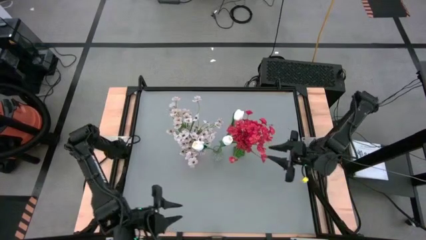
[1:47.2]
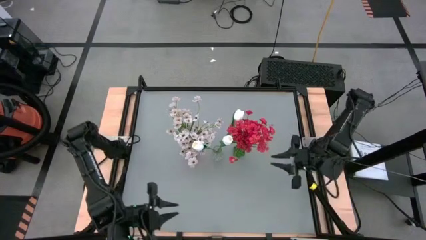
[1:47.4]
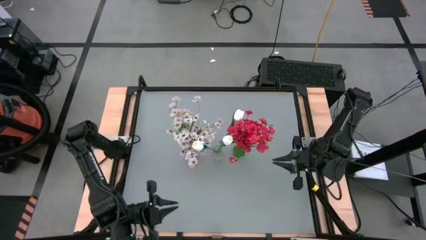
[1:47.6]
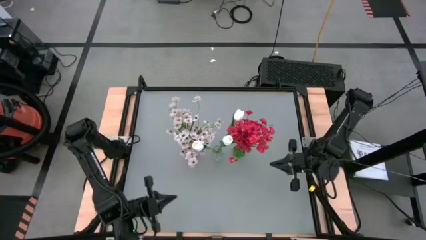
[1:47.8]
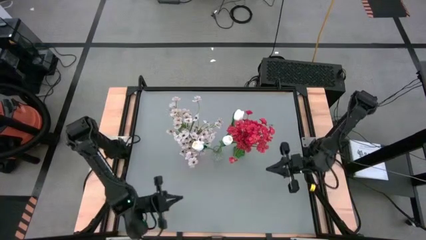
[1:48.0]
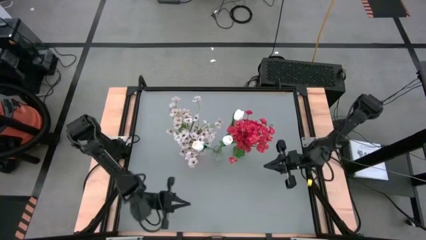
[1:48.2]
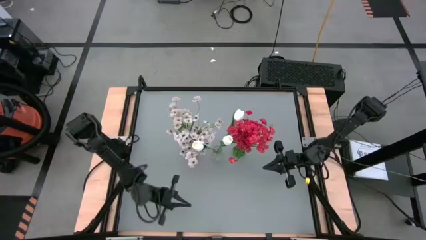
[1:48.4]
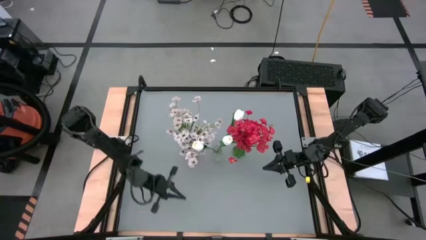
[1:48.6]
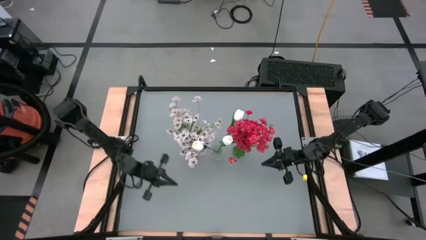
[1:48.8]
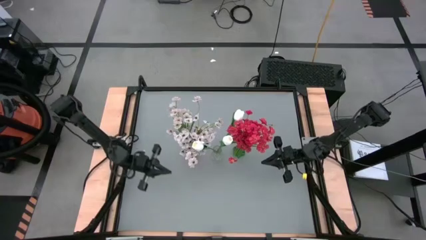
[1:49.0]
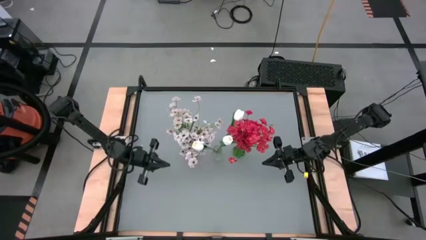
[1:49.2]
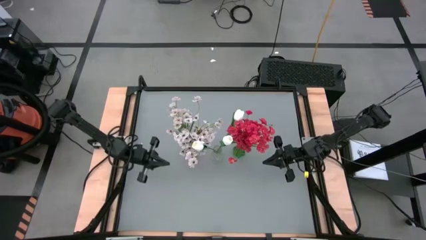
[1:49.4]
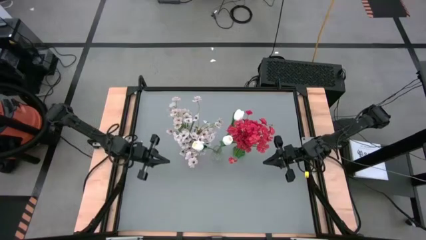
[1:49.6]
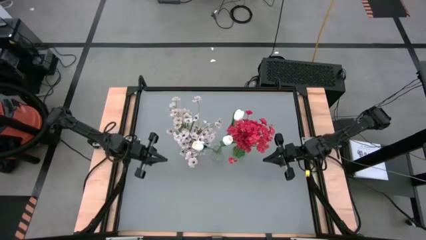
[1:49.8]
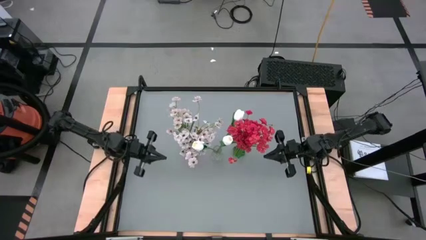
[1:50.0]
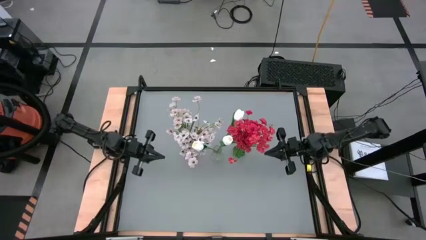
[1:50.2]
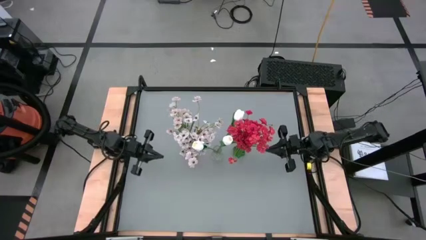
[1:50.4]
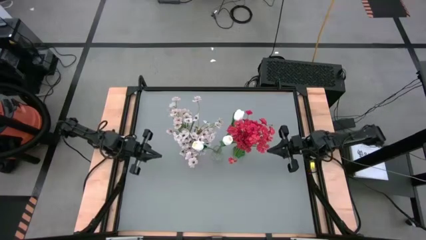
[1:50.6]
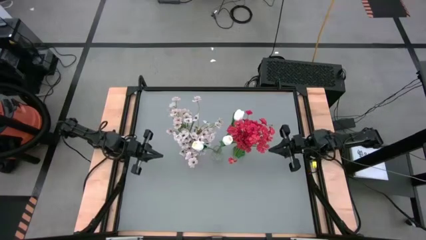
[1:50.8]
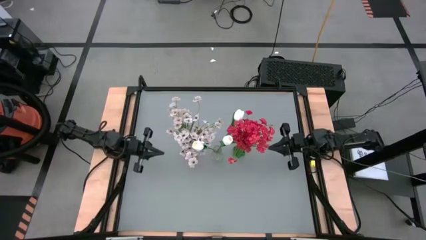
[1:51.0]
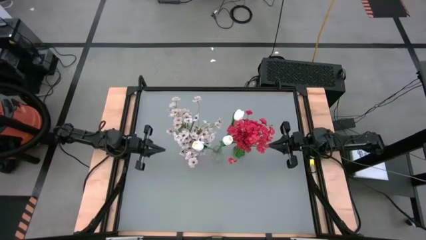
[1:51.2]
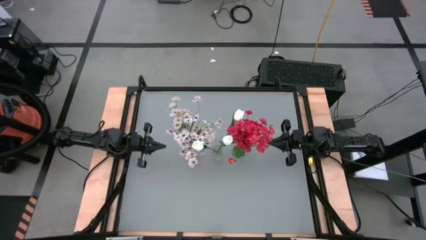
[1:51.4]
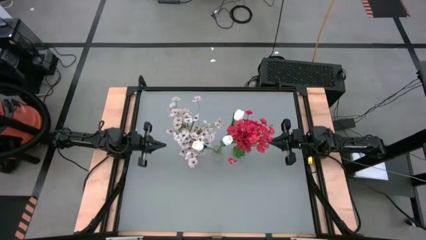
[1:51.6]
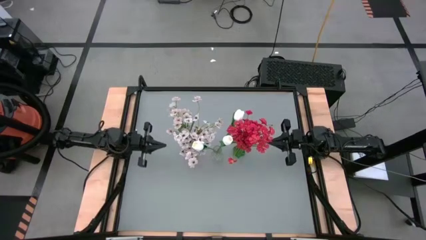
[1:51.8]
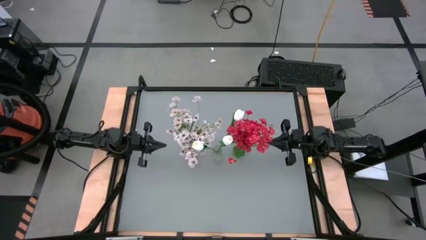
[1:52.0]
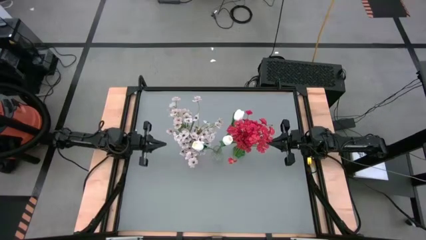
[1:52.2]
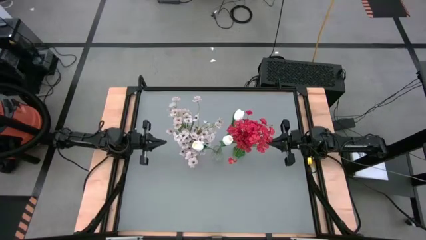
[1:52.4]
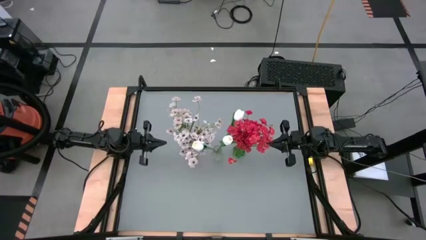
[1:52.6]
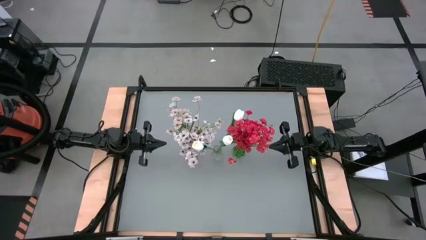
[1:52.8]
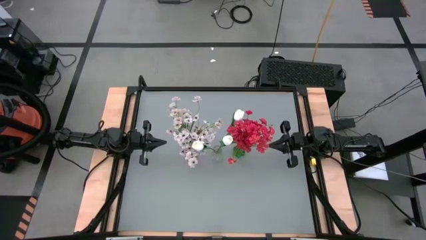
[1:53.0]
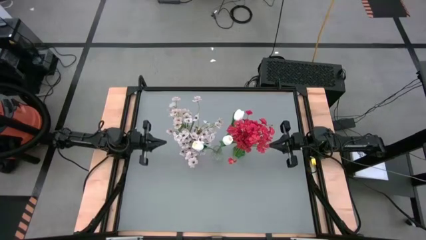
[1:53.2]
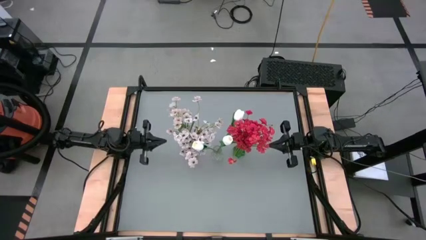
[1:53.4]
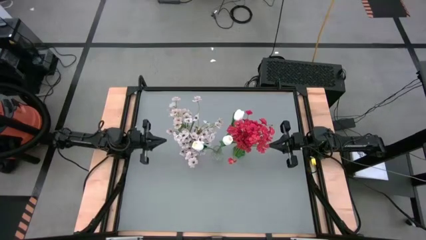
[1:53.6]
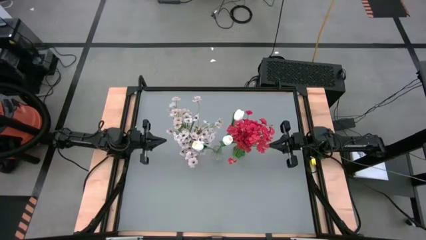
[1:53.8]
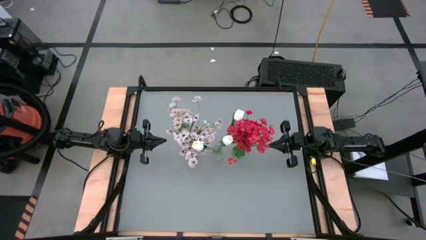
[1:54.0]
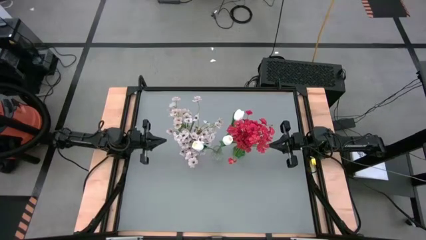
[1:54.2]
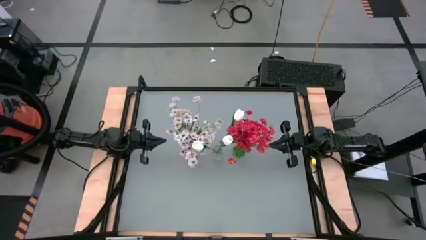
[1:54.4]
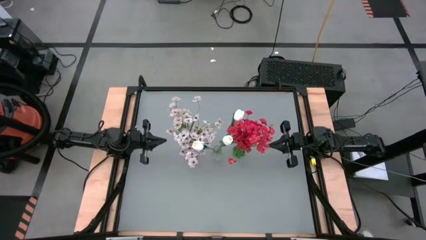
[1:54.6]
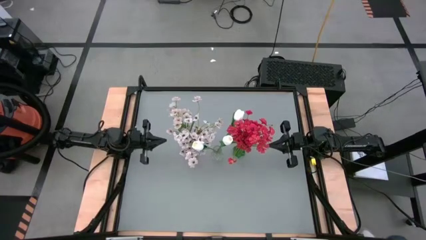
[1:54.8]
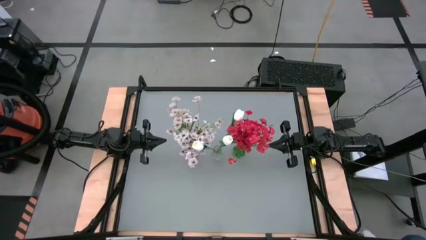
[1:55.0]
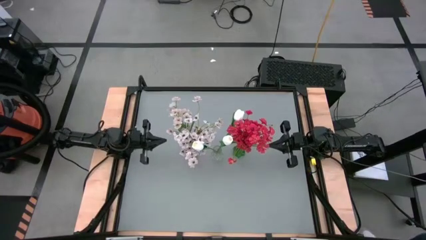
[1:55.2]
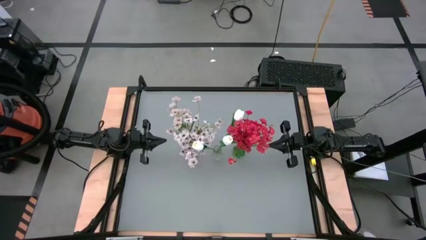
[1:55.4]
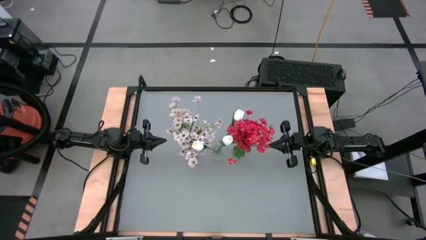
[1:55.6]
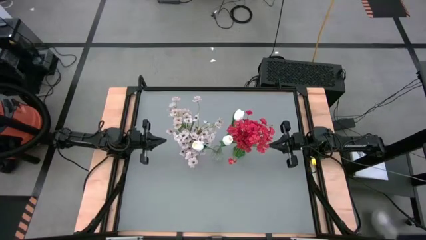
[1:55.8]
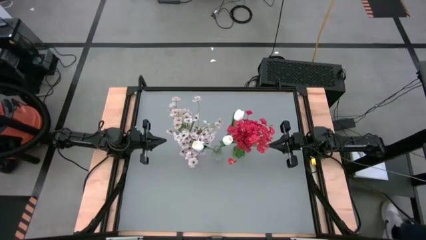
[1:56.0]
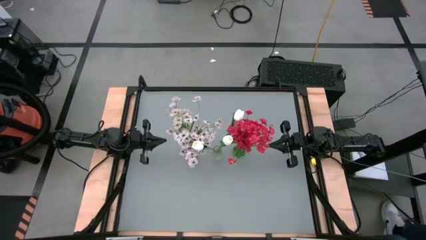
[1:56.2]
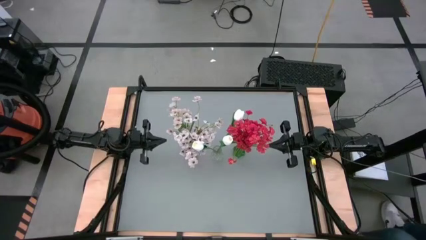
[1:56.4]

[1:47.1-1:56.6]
Task: Sort flowers into vase by color
Return to Home Position

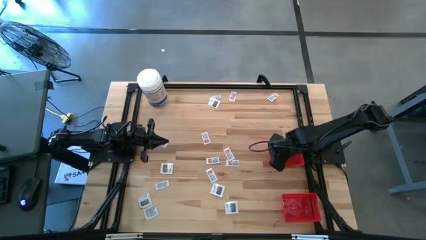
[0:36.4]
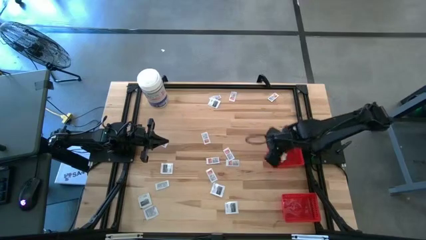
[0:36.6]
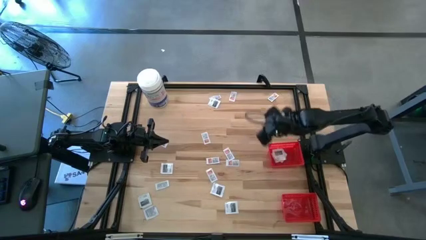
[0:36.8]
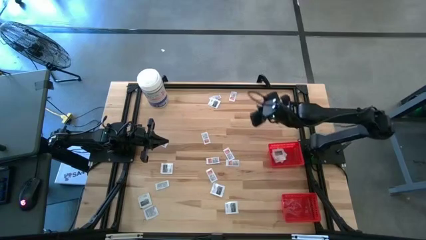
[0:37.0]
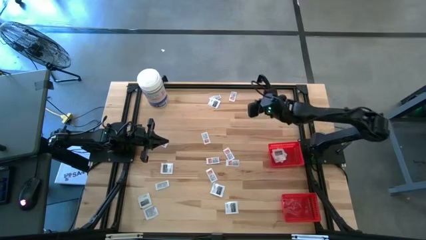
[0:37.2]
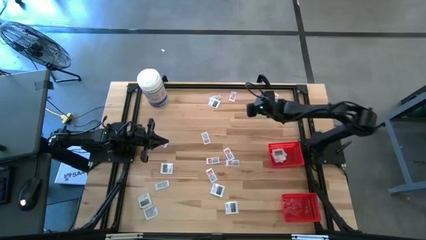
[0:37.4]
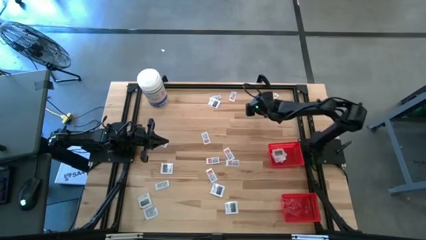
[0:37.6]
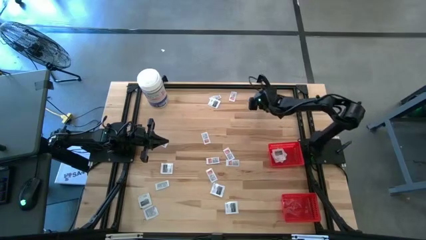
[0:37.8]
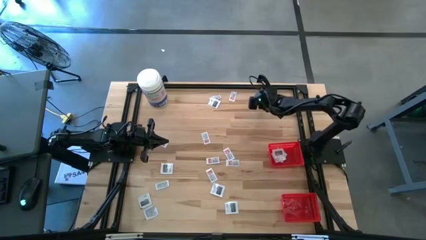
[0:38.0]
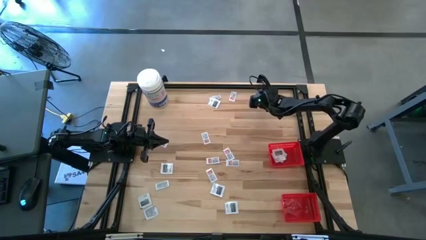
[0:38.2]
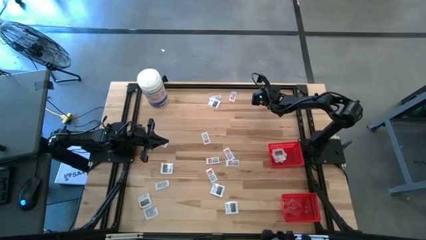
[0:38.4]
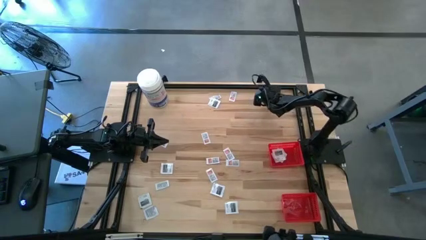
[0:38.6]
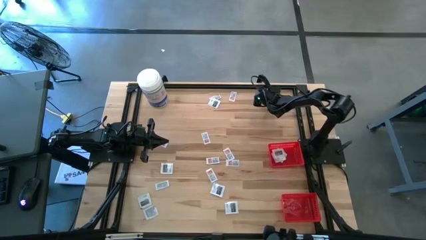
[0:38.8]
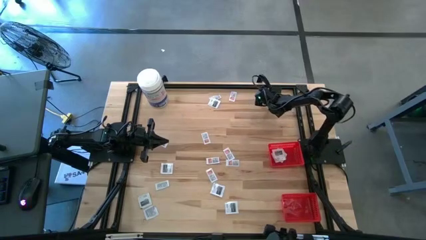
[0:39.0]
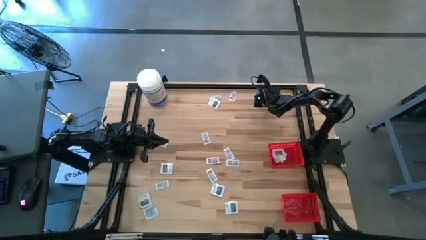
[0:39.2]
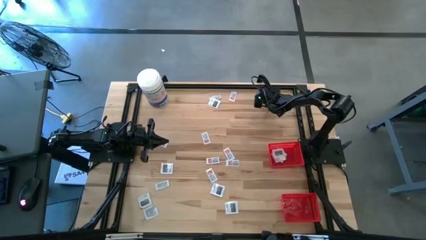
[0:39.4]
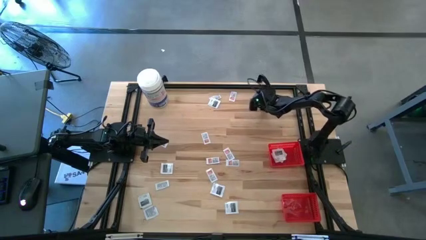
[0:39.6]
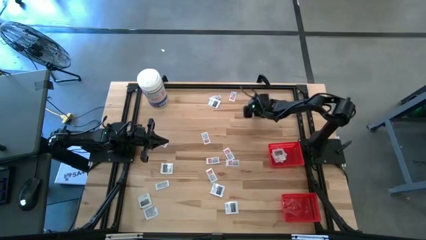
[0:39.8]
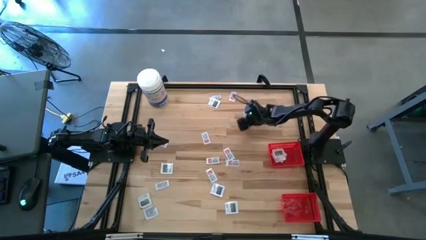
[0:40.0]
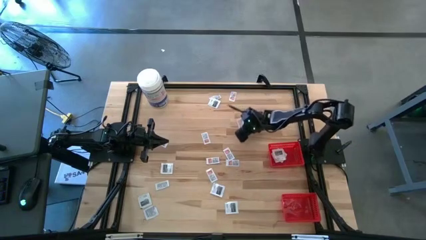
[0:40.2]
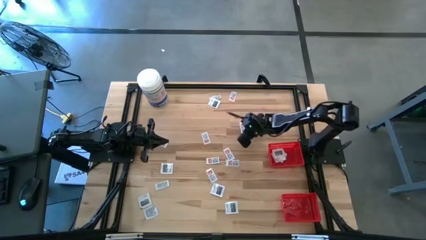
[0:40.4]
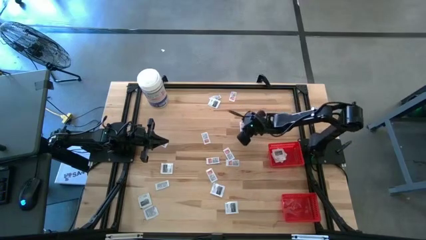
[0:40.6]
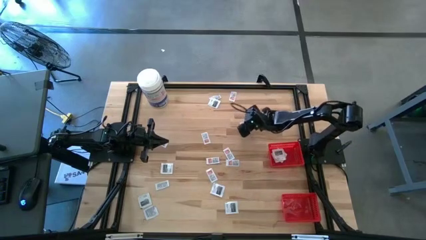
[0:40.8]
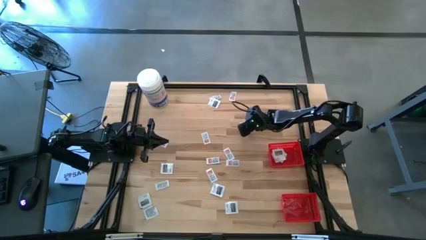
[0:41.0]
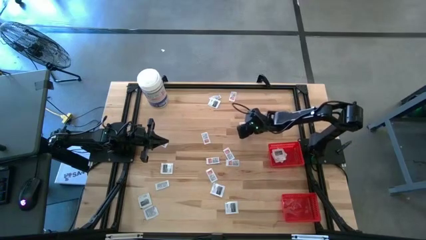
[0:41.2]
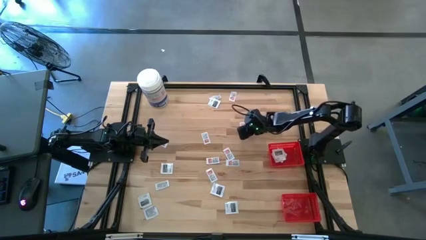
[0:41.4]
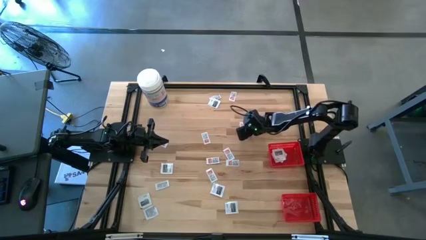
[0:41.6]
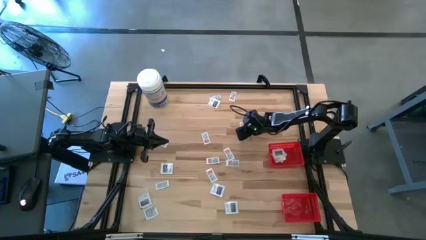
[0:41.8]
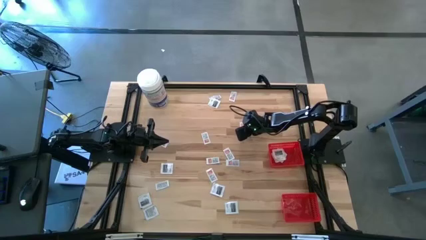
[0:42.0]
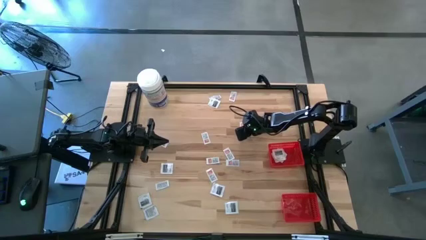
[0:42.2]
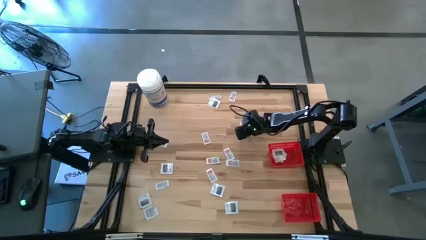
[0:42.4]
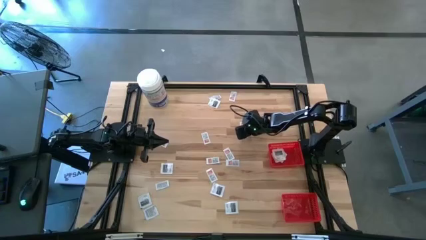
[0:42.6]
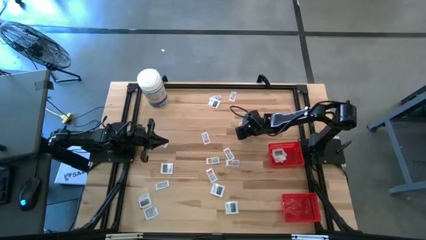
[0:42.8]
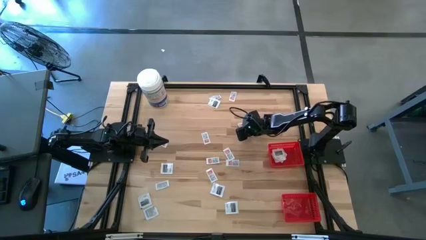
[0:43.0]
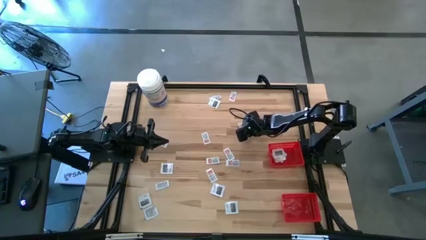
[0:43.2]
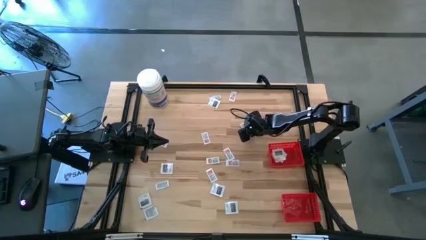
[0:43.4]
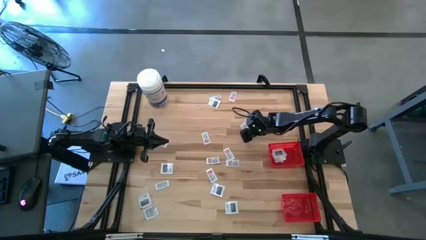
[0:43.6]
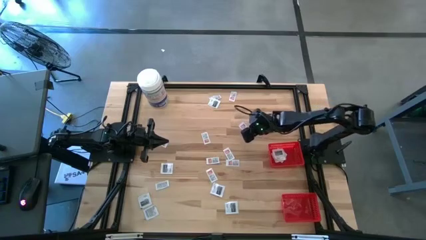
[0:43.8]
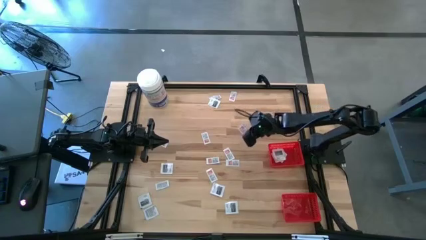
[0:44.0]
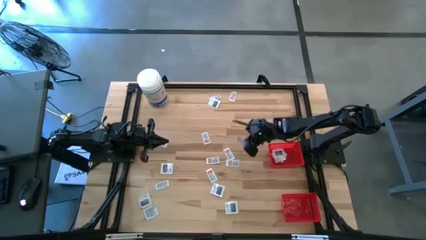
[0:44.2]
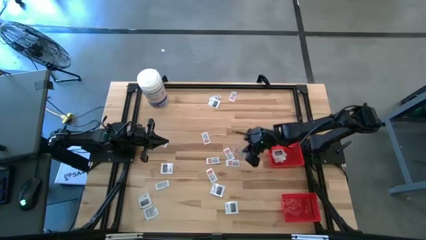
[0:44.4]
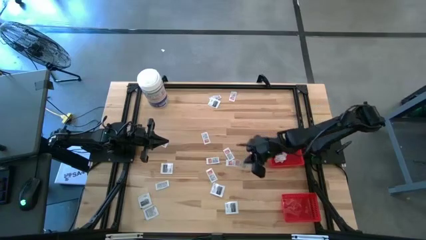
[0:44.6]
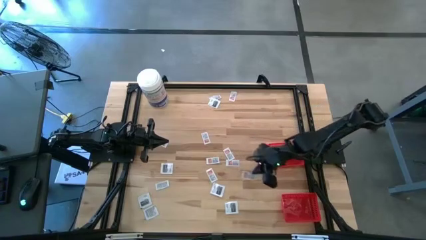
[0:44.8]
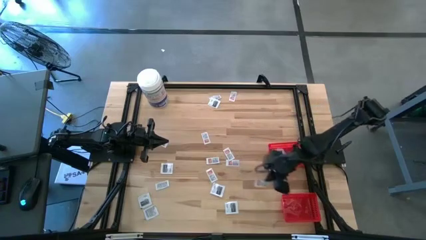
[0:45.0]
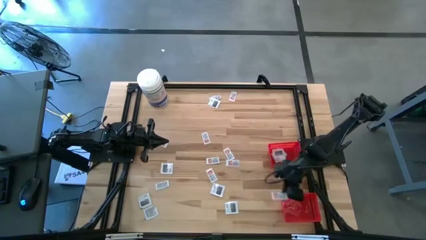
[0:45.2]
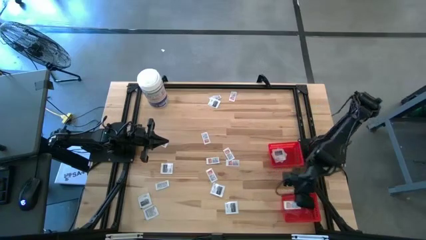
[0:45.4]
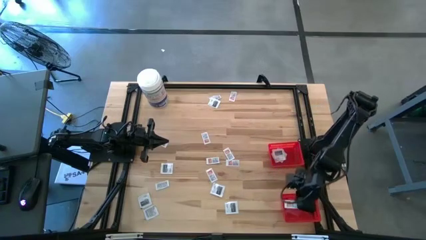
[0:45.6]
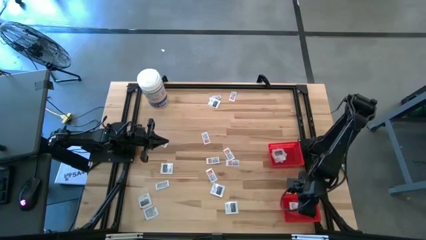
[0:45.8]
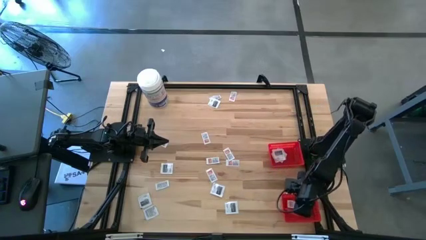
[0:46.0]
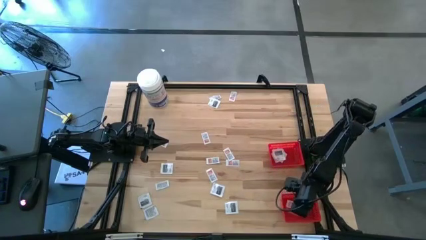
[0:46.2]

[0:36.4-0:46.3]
Task: Pick & Place First Aid Supplies
Put the orange ointment pack into the bottom red basket
